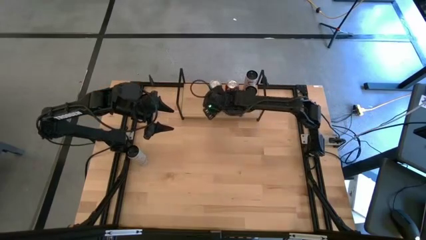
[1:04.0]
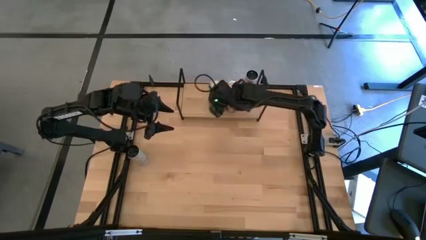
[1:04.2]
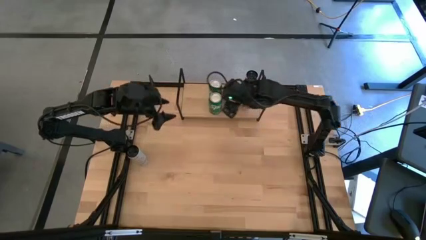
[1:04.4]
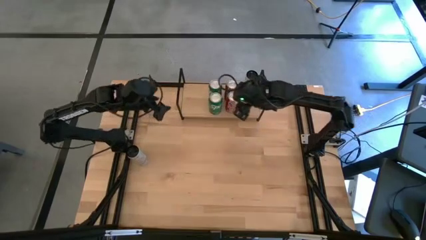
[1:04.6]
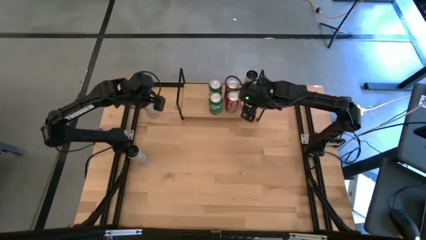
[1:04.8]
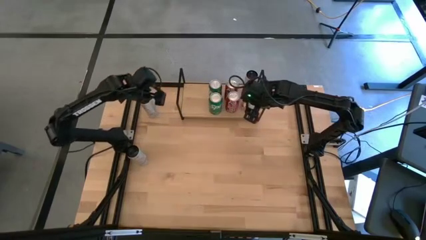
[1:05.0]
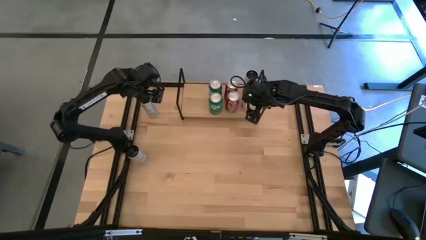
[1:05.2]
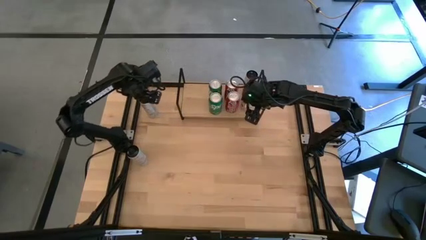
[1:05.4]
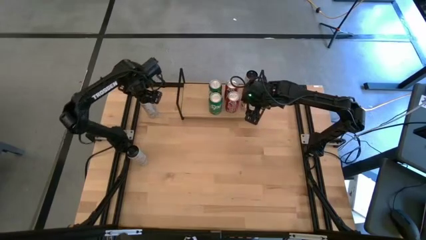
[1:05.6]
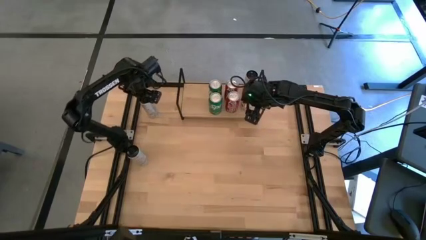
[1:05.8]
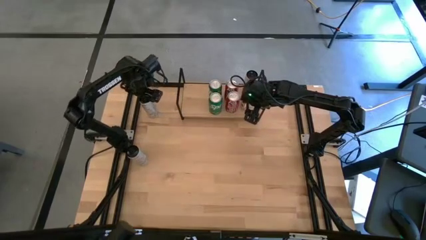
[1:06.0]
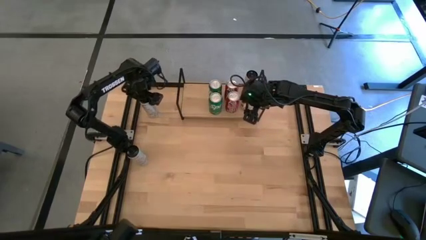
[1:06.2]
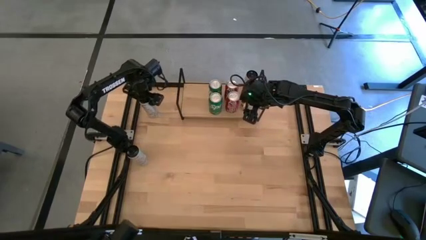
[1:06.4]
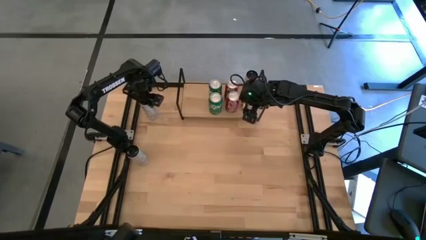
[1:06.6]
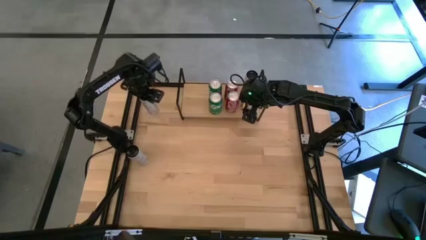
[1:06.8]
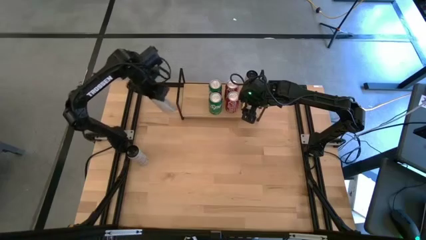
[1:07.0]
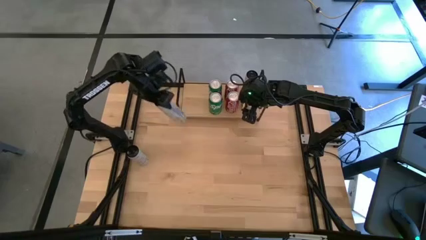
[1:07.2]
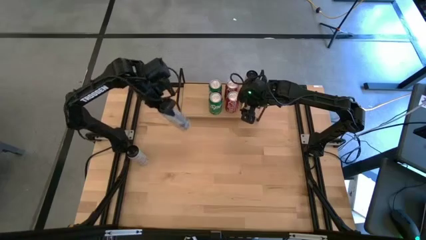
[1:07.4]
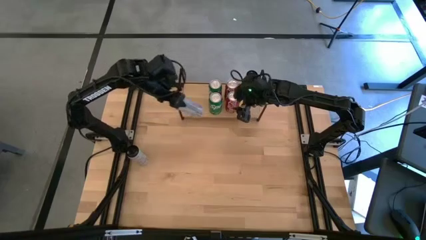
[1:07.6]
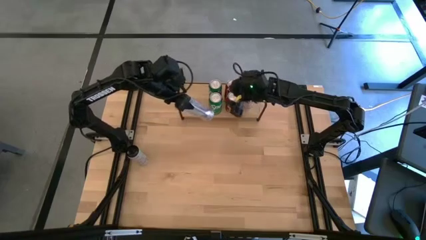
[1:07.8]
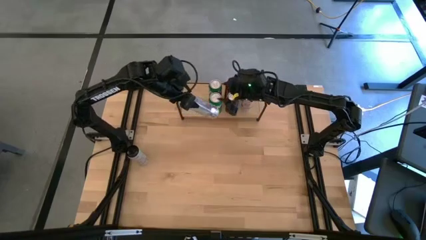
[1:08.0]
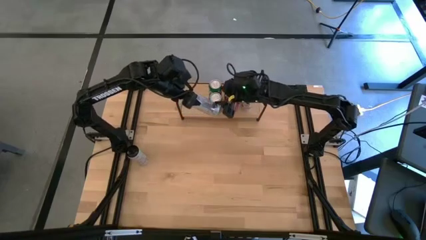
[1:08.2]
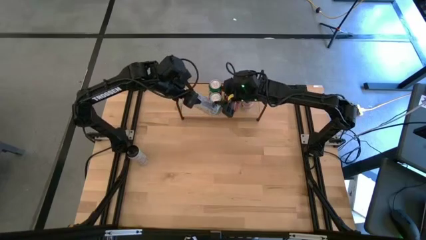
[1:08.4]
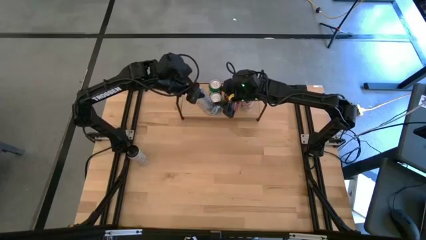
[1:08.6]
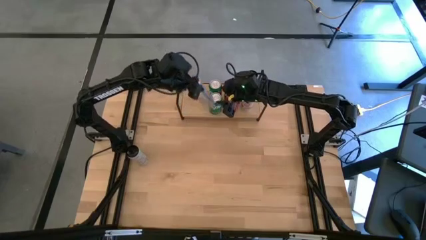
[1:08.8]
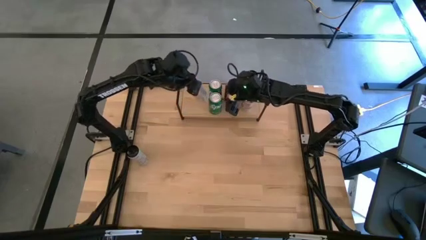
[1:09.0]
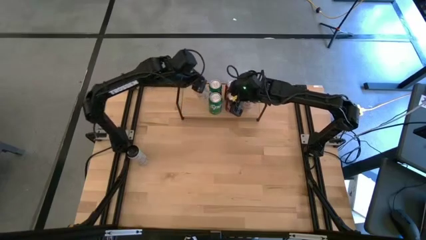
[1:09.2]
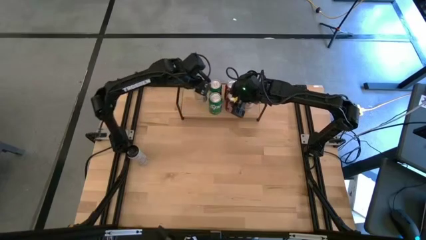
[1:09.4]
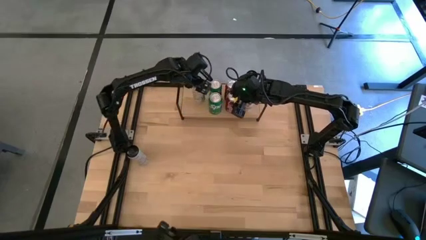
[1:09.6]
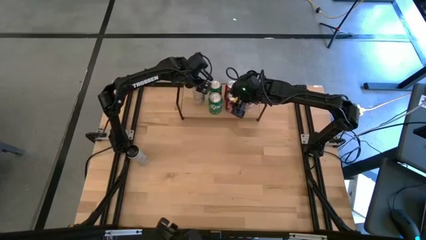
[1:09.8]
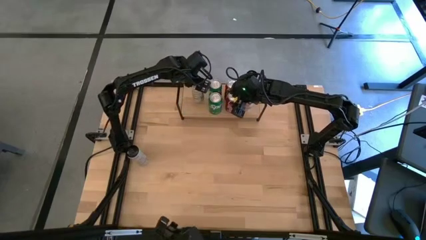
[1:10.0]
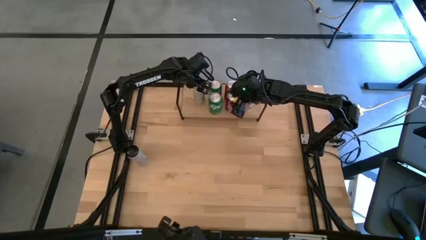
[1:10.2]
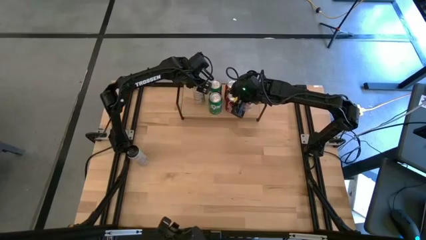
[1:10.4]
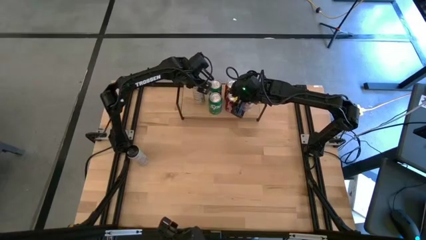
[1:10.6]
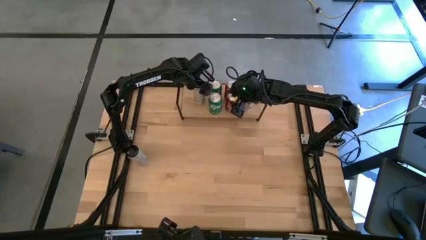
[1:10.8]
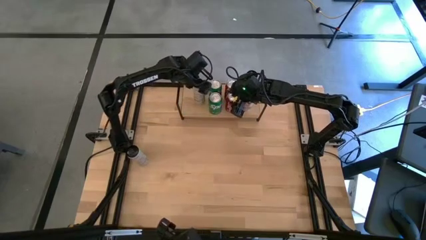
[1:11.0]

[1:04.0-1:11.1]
Task: Place canned beverage on shelf
Put the white yellow soda can on the shelf

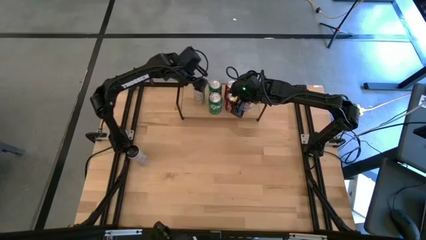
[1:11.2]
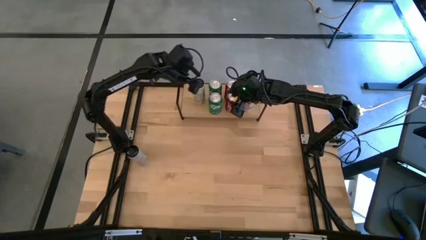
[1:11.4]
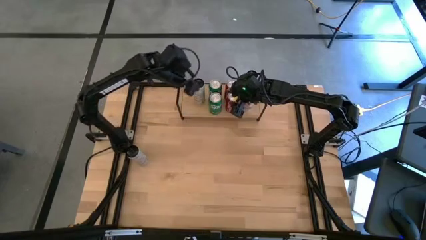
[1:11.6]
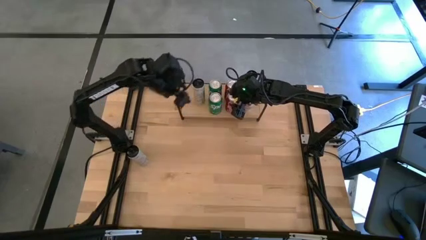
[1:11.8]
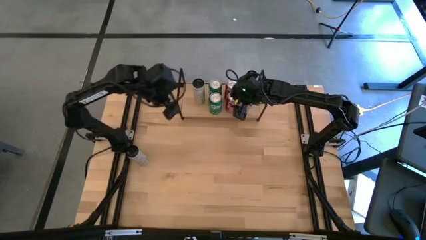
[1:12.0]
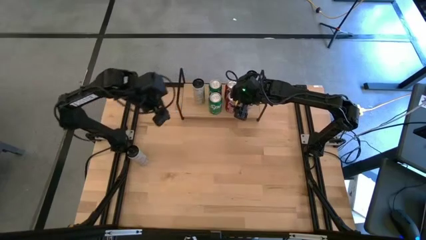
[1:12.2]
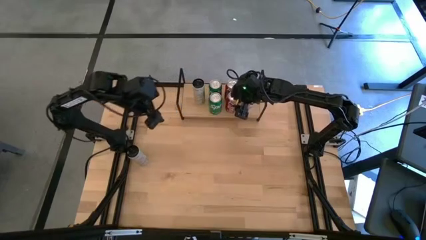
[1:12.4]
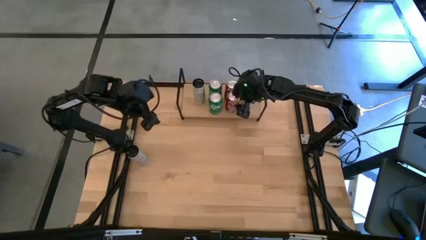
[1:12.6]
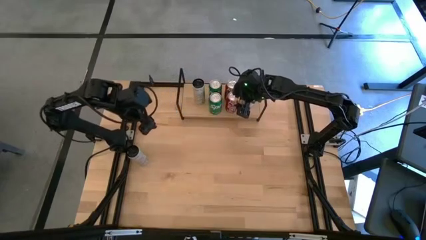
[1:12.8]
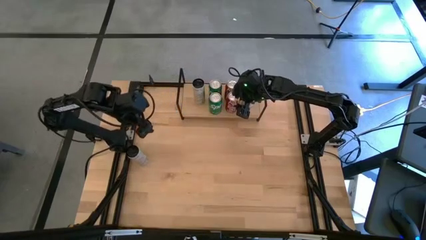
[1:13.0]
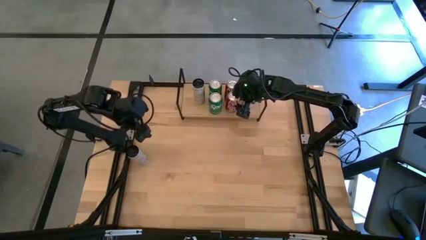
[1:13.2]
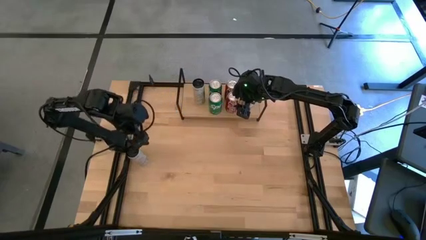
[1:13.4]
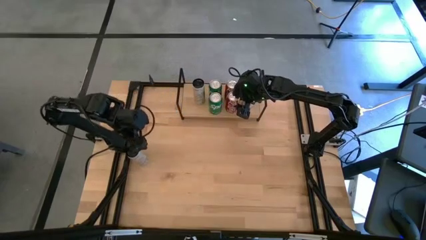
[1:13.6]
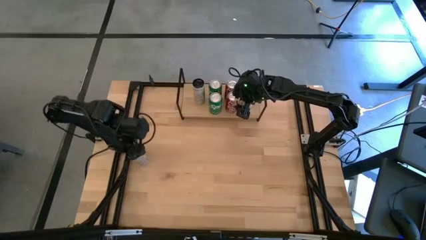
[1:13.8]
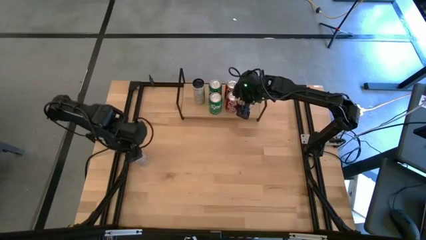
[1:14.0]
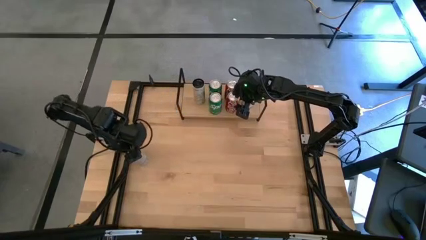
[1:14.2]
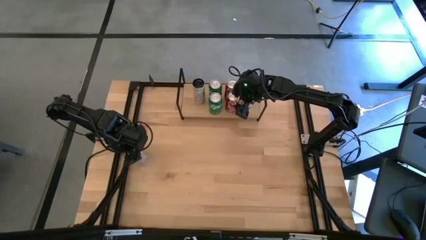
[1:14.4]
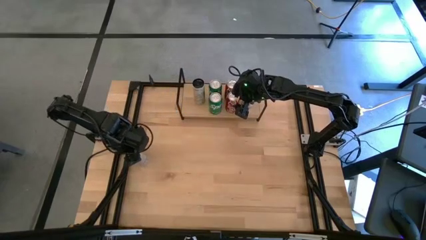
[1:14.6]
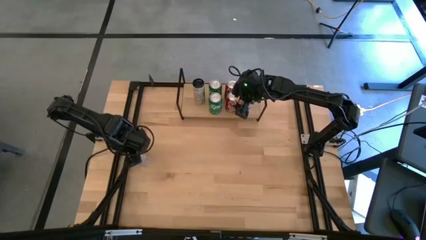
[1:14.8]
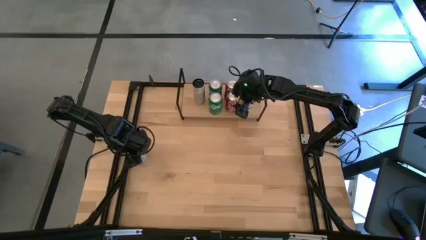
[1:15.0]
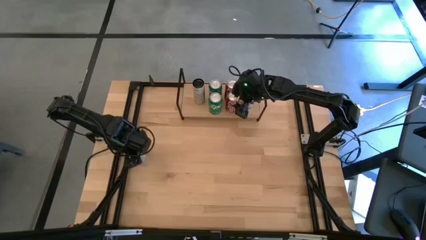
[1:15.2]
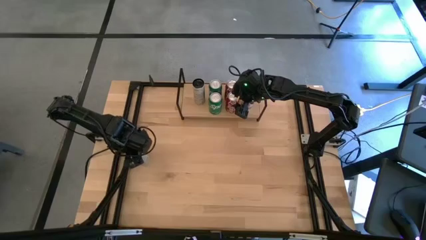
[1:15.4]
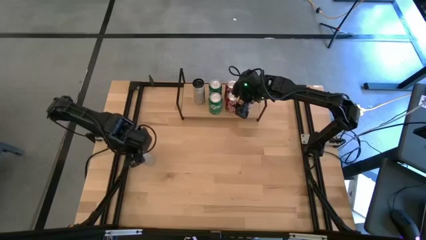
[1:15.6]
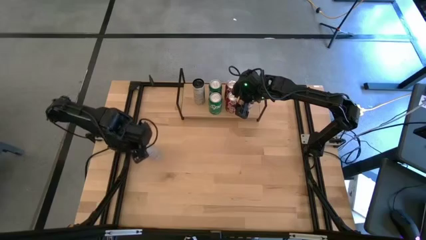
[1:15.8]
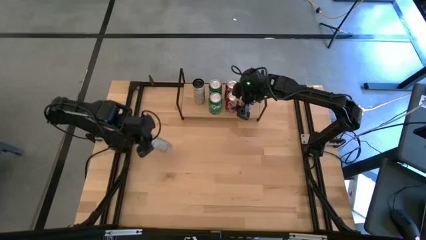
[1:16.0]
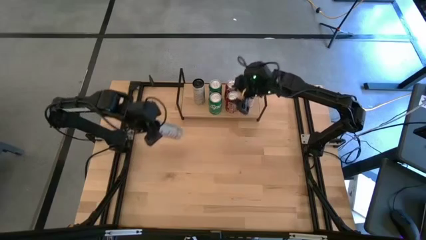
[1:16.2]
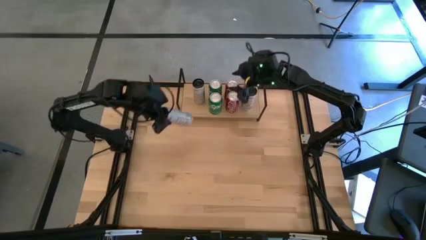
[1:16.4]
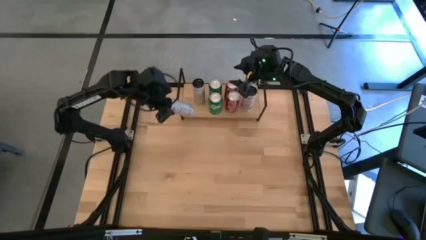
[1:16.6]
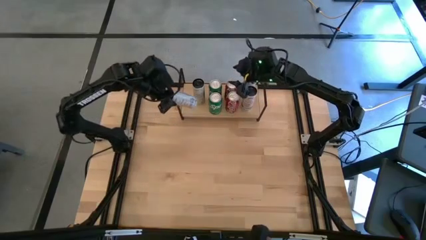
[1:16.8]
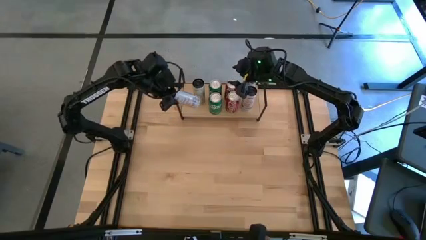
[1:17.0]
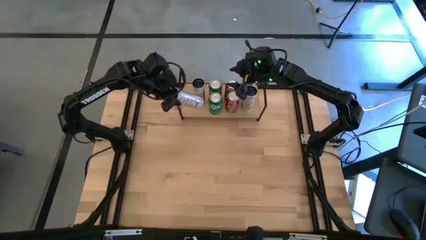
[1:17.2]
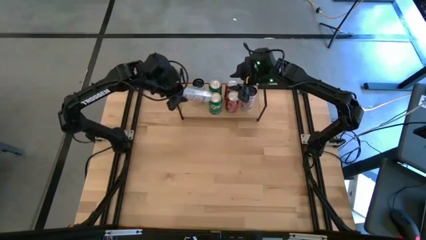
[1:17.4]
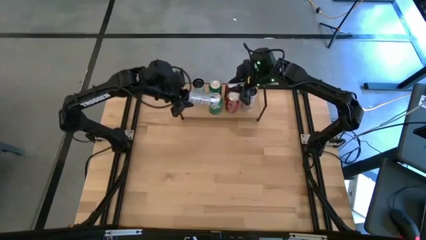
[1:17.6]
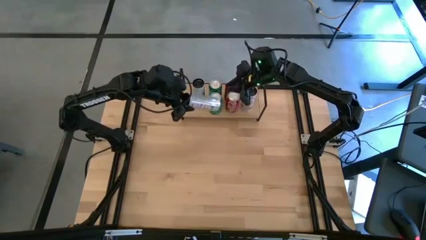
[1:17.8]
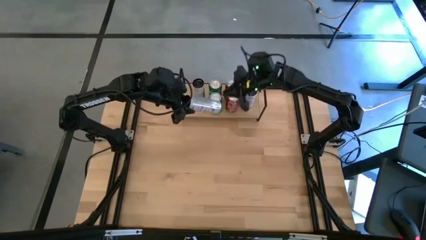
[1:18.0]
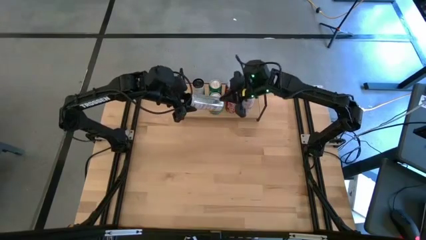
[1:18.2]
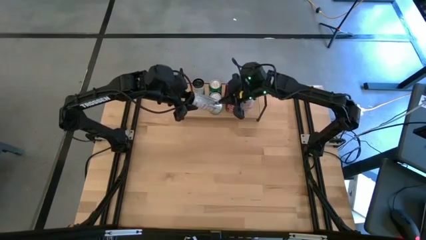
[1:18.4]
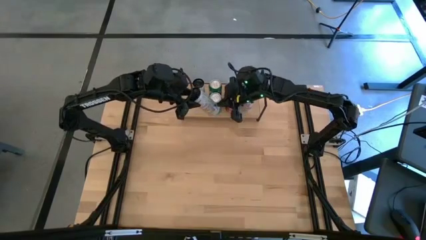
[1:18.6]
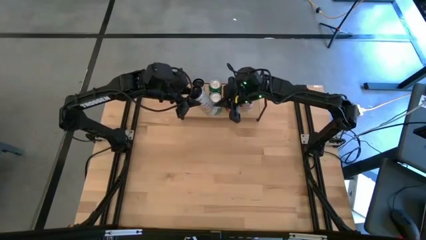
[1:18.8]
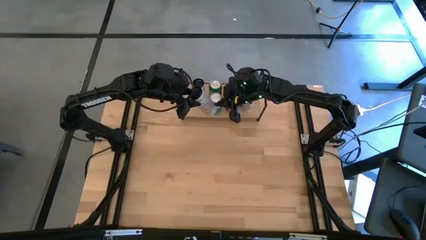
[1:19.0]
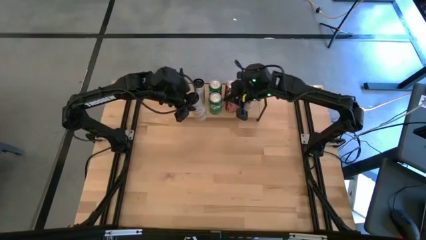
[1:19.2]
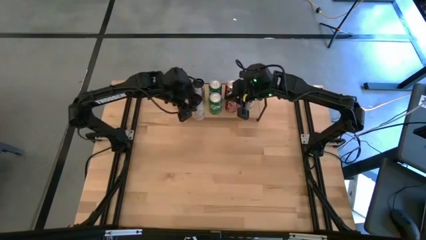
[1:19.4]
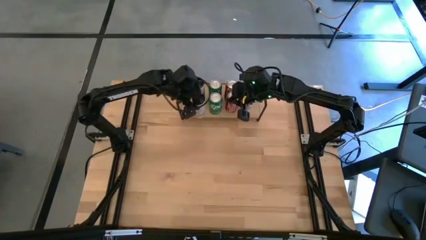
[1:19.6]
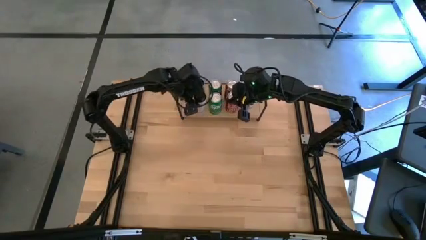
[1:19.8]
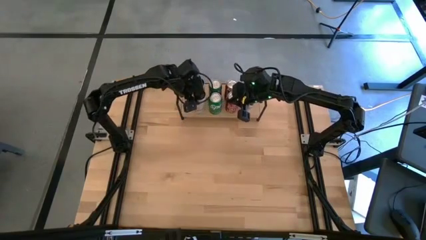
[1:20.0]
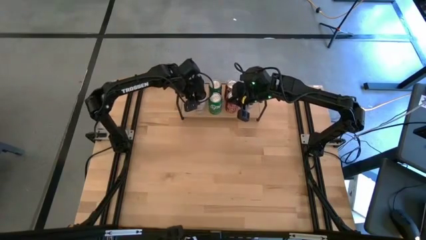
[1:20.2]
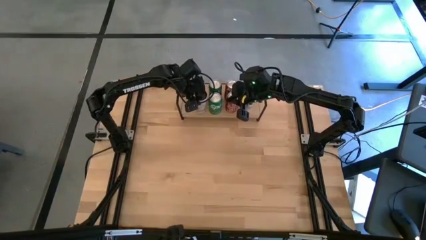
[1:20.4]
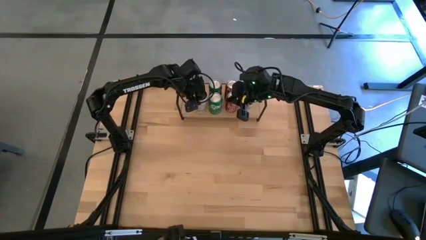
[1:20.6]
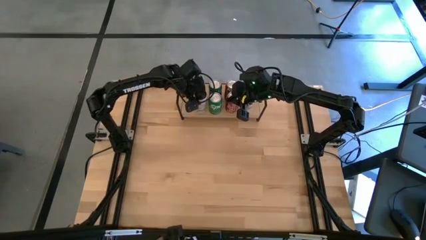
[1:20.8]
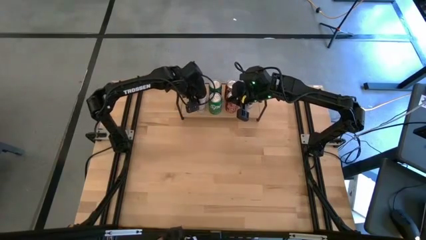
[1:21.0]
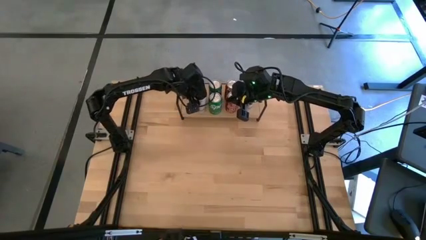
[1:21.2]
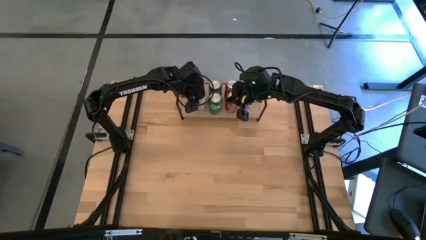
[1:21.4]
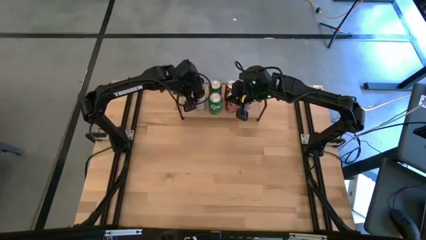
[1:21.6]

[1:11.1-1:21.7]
Put the white yellow soda can on the shelf aligned with the other white yellow soda can
